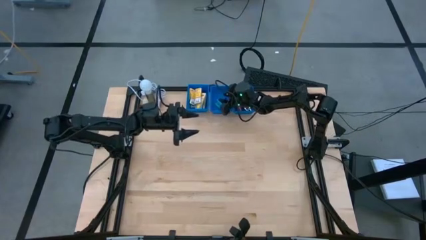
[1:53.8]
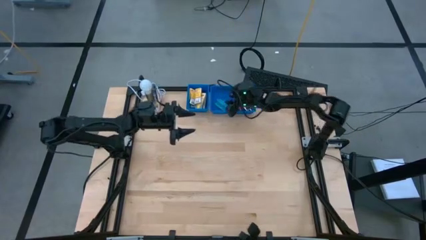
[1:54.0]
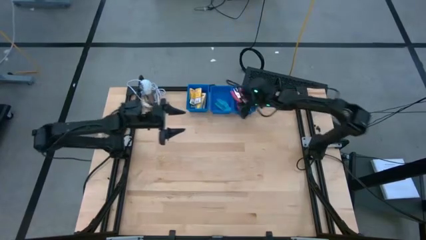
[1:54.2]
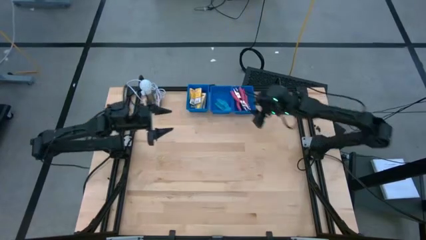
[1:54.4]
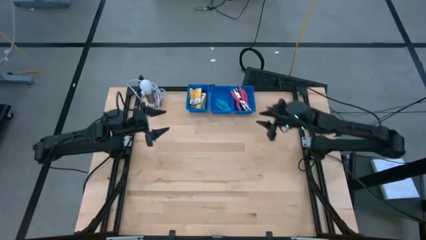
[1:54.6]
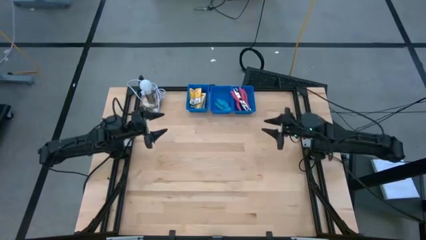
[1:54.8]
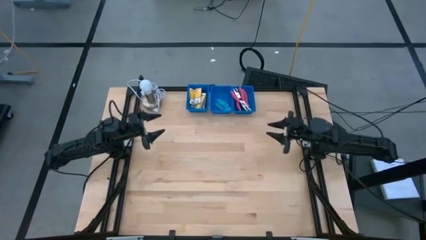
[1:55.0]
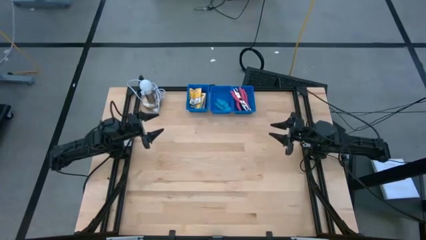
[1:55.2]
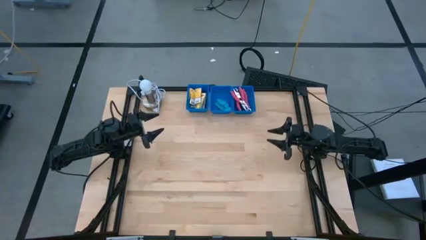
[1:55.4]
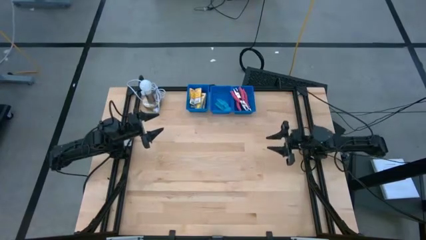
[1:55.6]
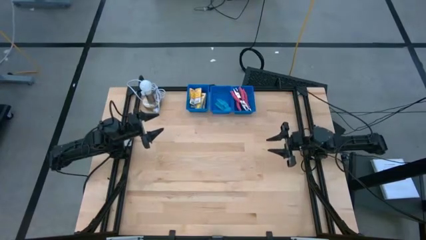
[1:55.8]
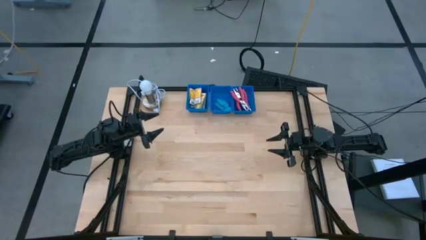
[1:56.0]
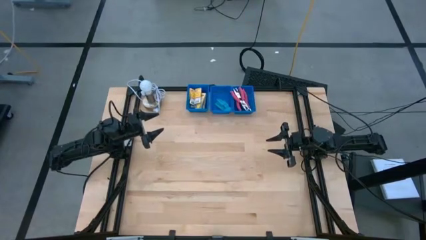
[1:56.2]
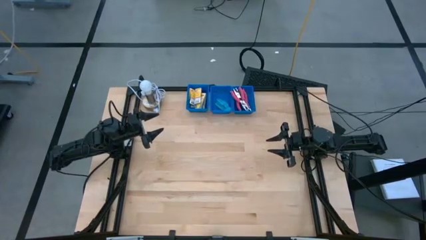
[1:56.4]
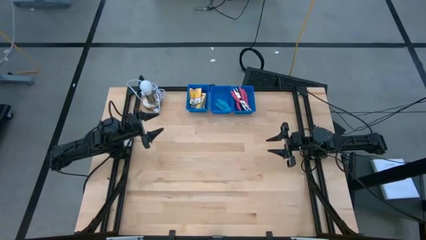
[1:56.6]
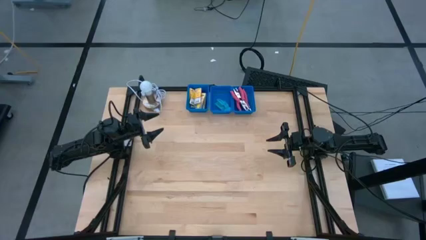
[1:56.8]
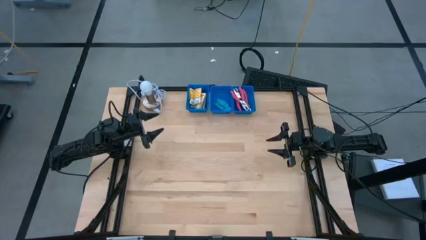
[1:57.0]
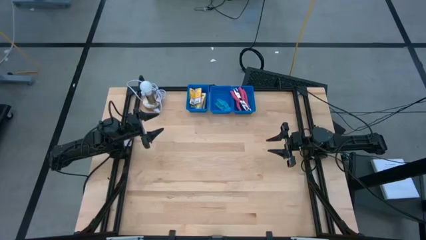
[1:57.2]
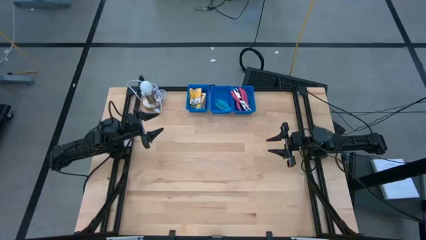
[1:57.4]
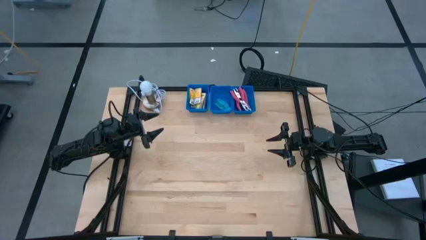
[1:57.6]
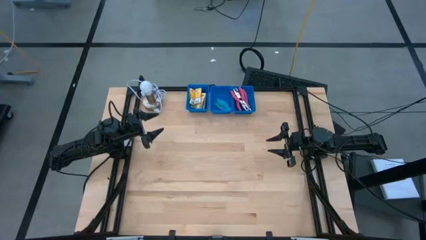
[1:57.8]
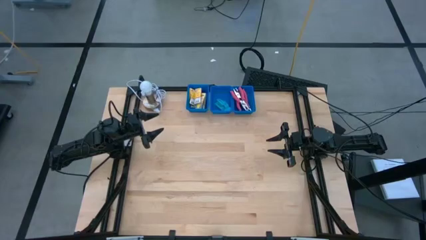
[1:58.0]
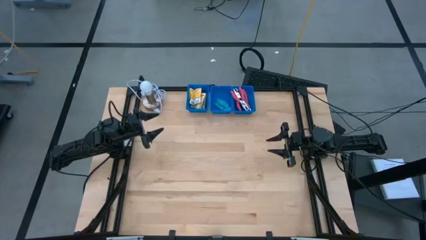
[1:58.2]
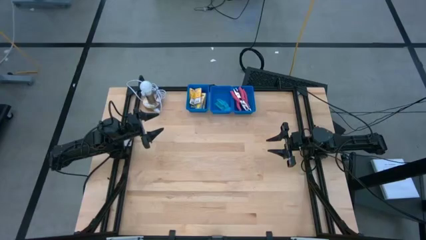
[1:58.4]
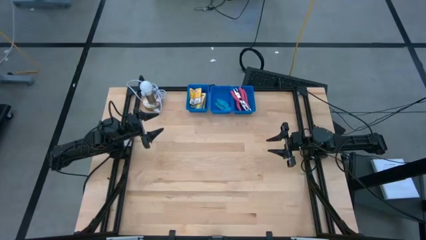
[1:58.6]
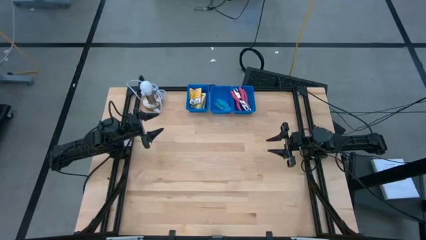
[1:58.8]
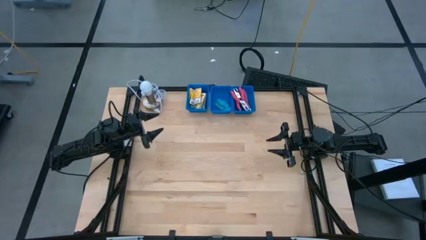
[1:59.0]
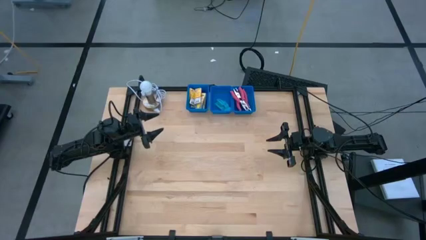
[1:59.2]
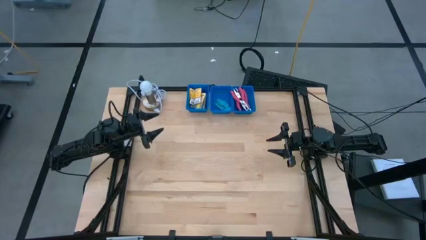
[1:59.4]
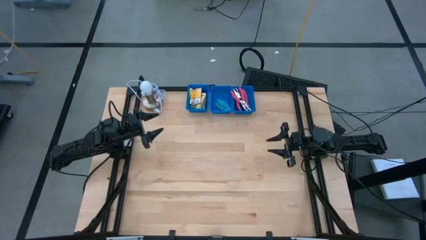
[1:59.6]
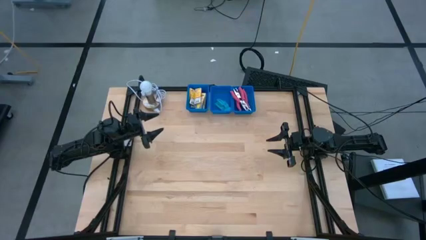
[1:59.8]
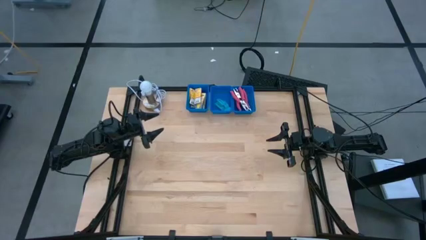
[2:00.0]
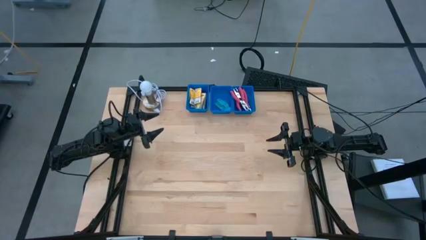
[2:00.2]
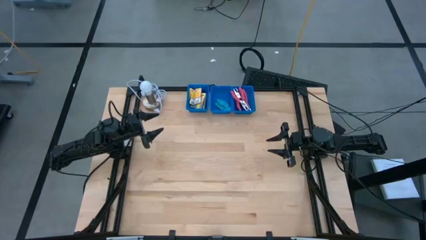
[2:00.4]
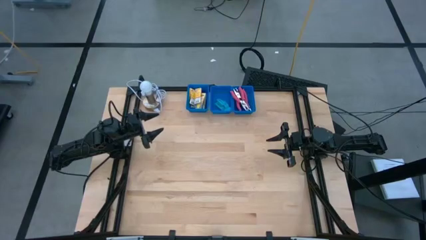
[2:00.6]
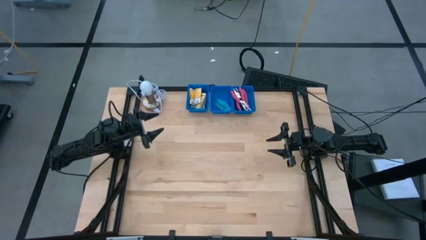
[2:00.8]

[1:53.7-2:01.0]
Task: Pick & Place School Supplies
Return to Home Position

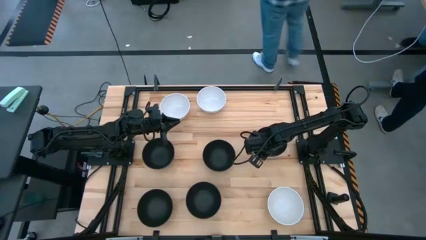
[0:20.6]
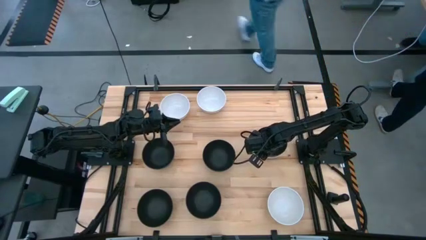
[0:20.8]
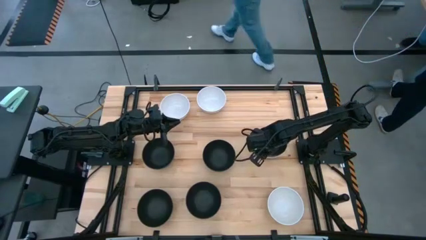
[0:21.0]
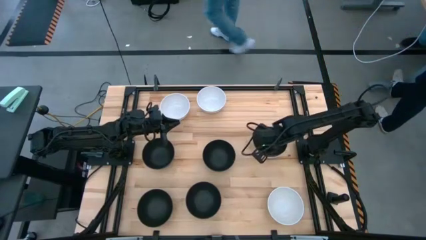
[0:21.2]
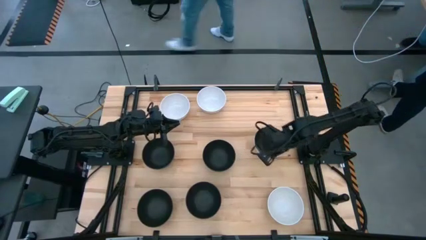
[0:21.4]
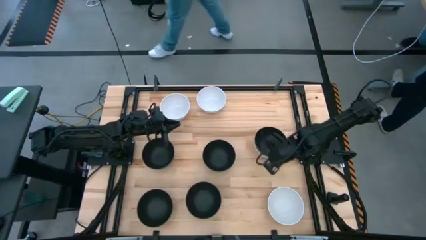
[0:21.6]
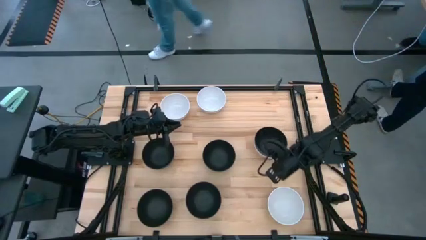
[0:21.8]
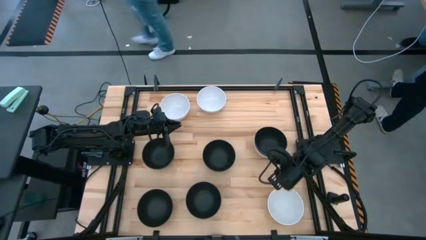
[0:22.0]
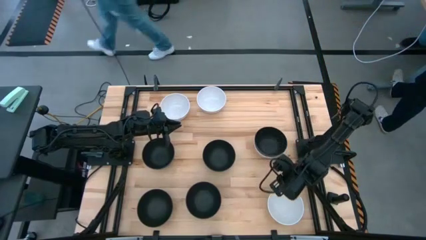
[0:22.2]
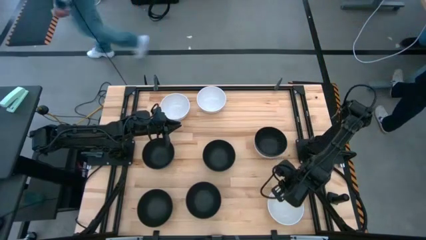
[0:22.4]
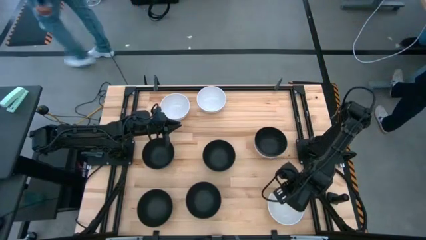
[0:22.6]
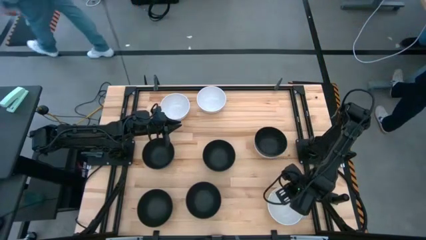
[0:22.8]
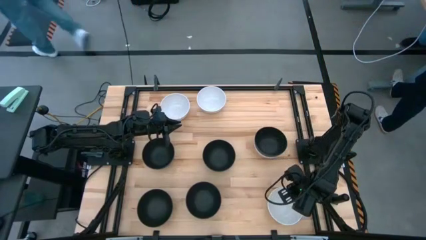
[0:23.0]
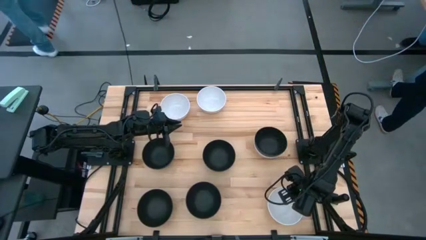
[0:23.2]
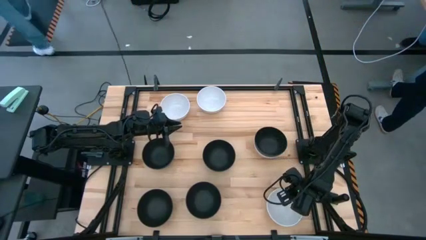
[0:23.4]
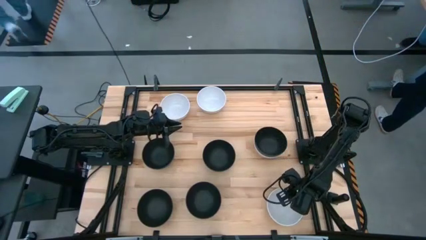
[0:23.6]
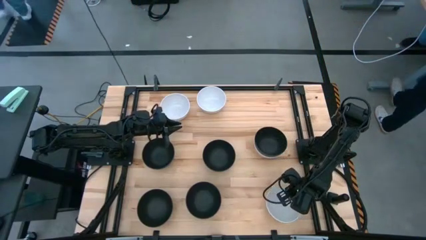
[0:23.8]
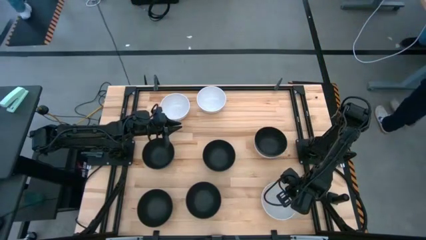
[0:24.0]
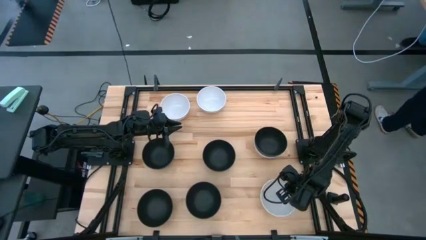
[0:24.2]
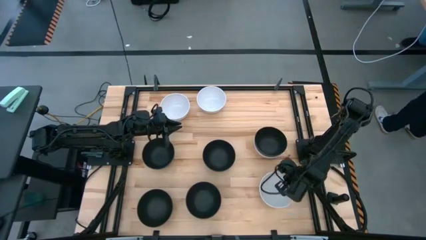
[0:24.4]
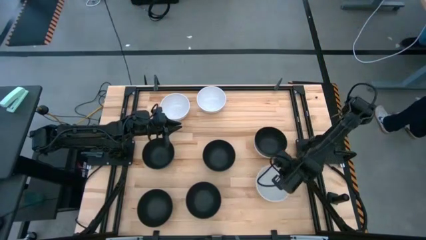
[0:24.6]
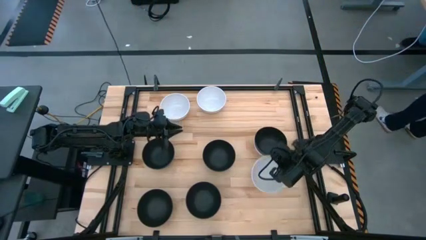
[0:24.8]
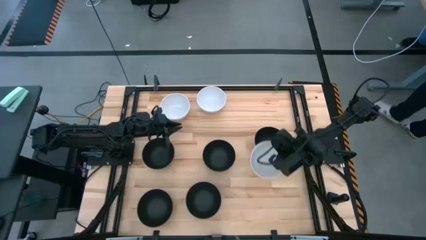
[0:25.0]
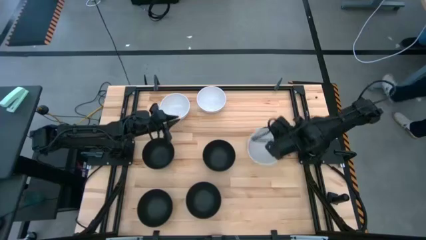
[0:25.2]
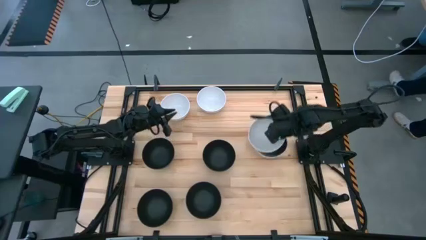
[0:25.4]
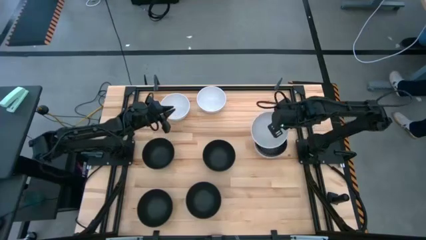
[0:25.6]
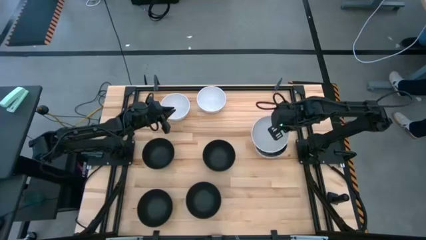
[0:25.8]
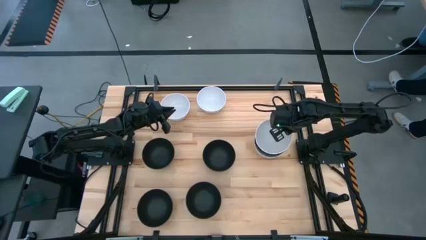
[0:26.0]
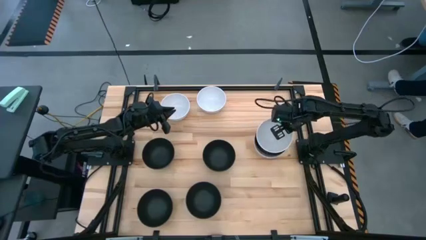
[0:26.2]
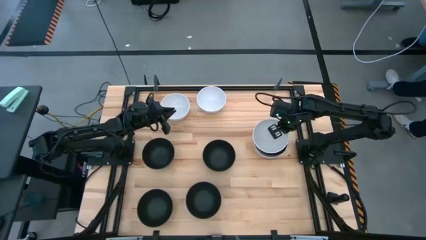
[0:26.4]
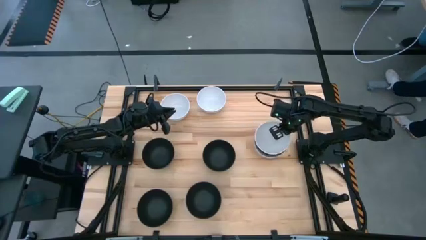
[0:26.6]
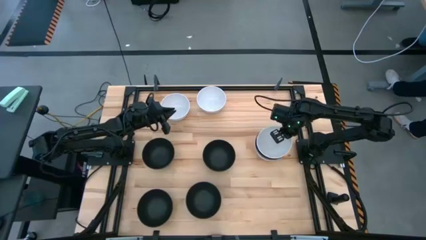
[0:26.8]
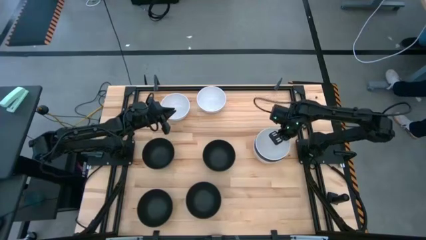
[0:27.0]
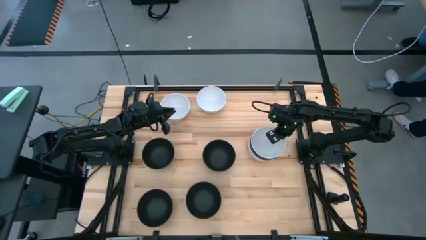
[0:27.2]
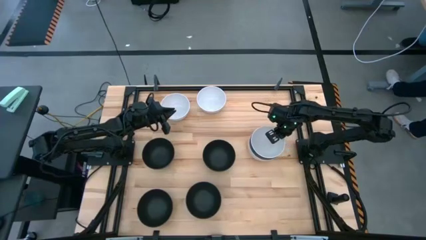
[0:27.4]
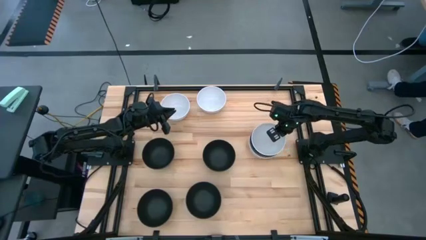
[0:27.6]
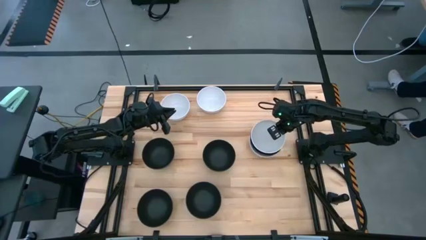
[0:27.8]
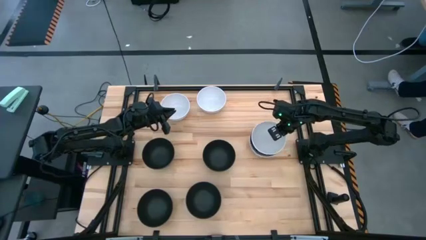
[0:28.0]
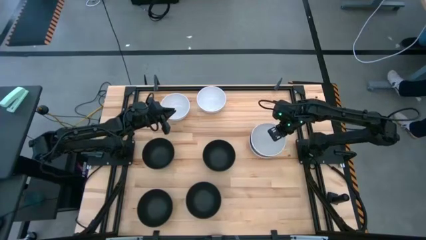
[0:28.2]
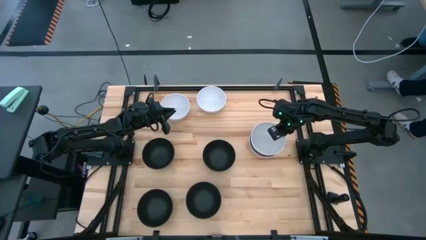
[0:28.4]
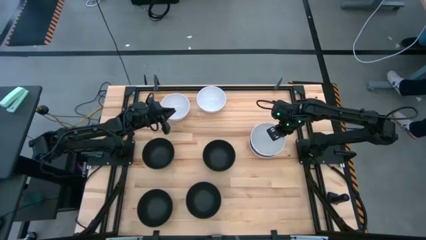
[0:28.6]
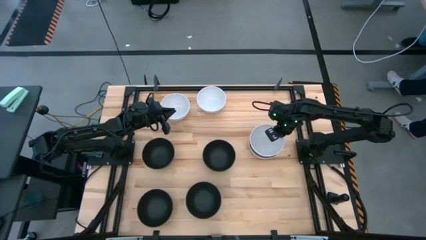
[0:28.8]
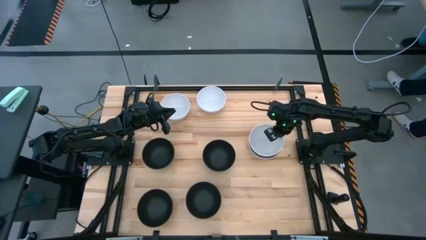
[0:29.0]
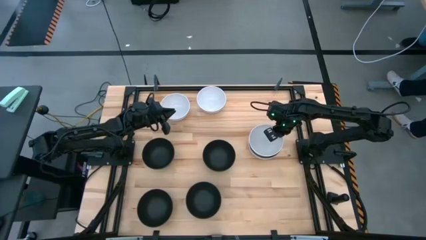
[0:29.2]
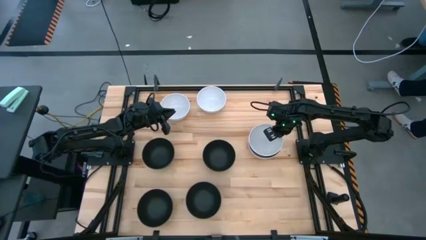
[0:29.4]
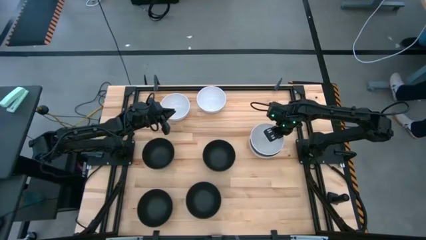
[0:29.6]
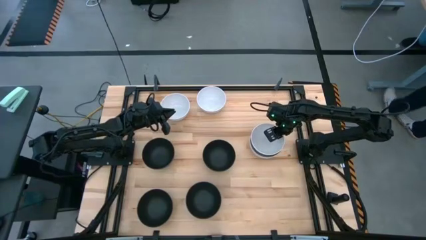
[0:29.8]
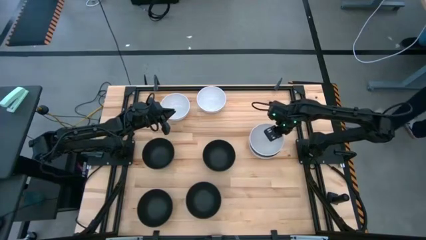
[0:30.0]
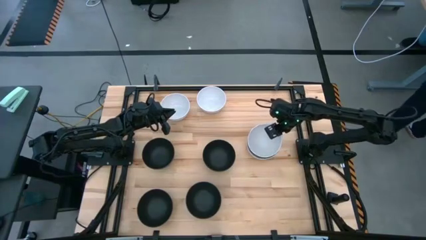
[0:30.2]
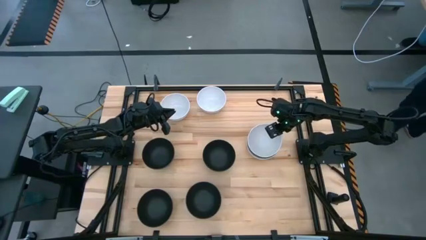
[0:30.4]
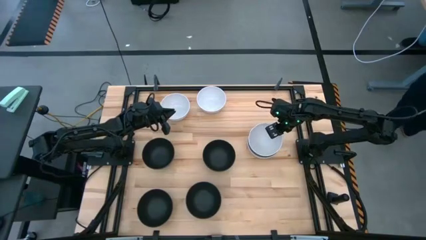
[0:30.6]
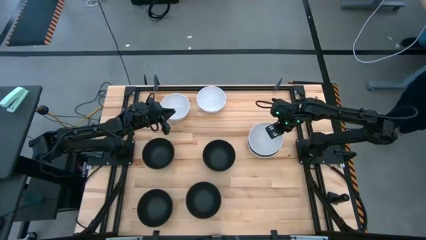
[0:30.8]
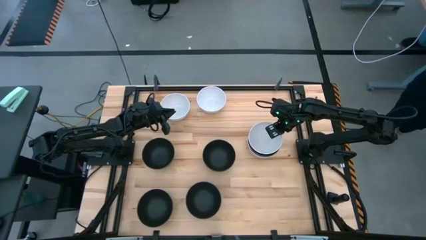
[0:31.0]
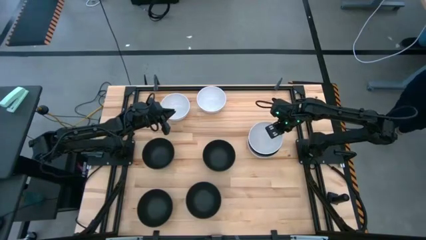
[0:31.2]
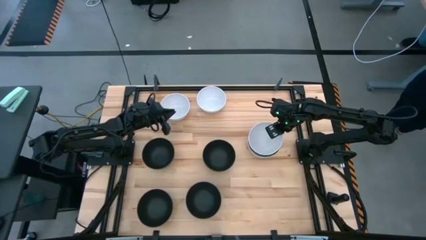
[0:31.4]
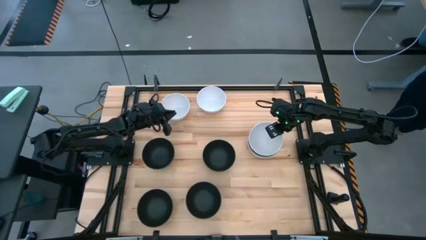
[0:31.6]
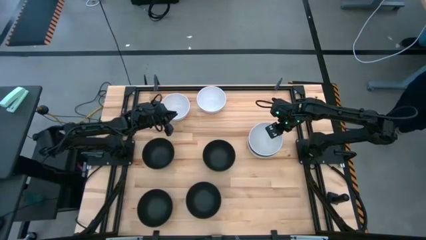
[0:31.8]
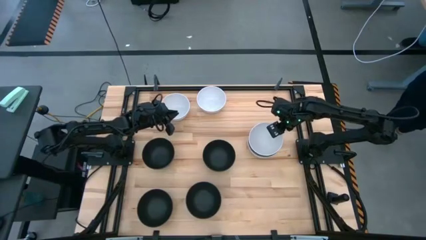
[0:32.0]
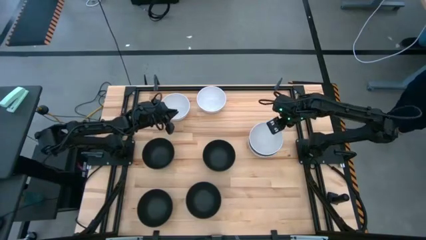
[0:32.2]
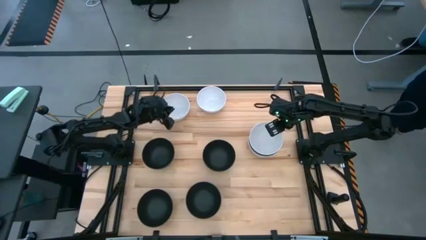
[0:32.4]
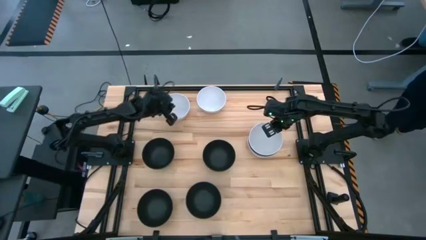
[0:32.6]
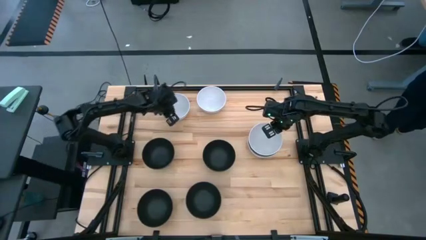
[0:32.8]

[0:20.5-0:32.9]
Task: Nest bowls inside each other
Stack the white bowl on top of the black bowls
